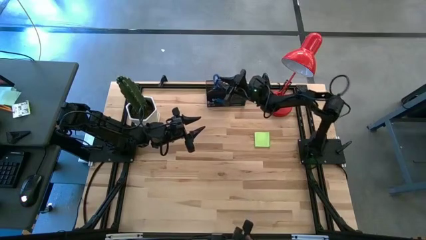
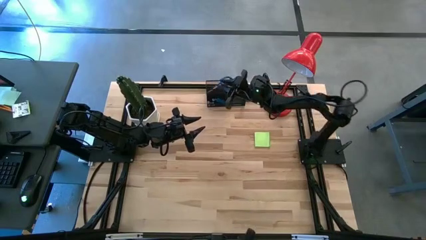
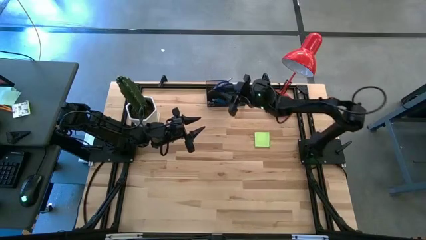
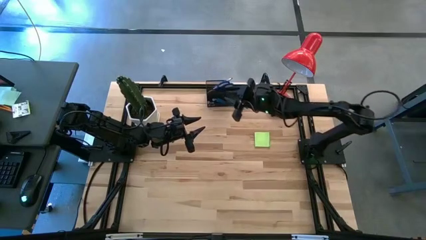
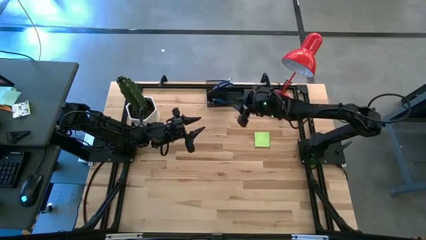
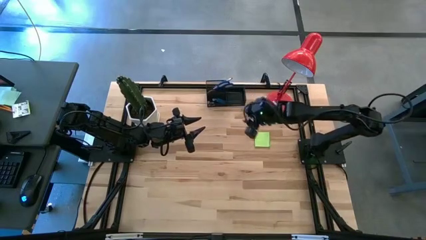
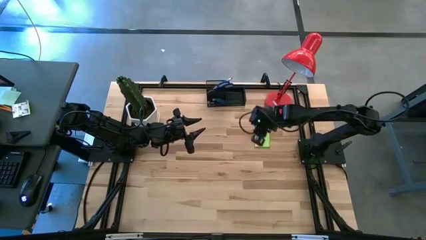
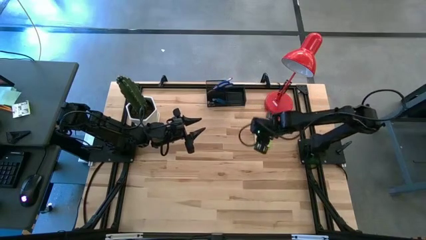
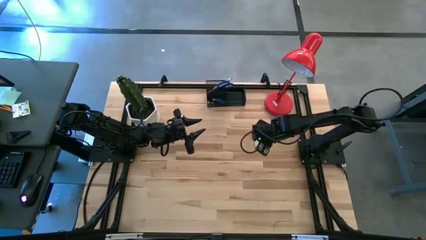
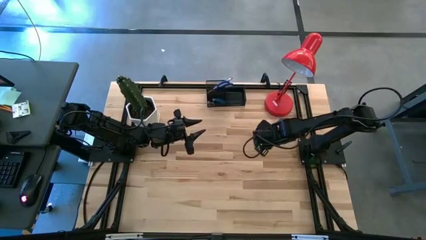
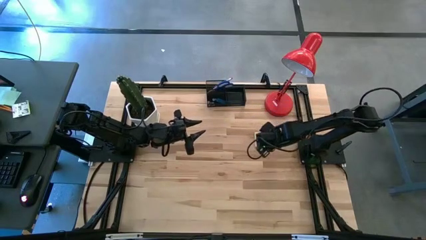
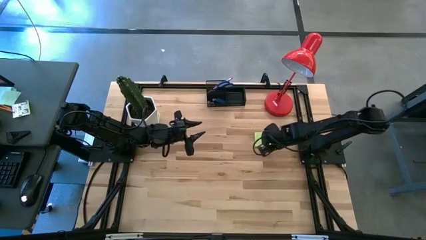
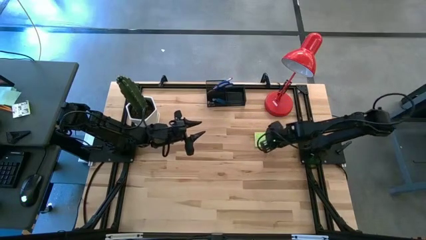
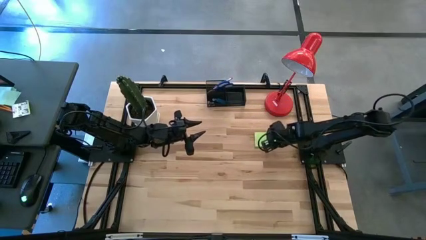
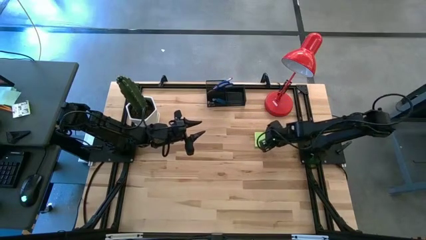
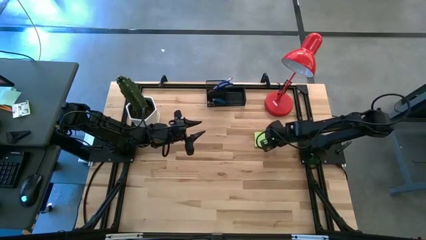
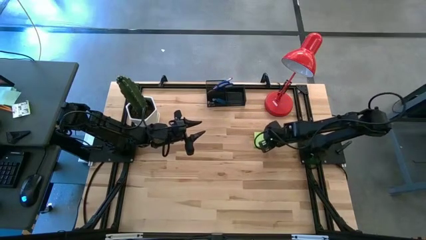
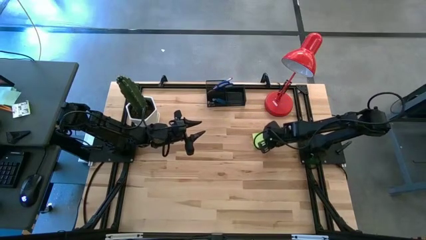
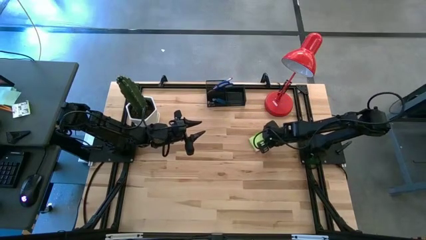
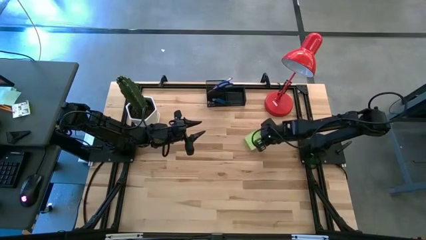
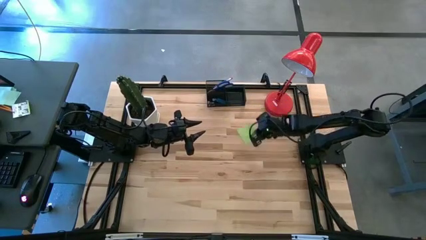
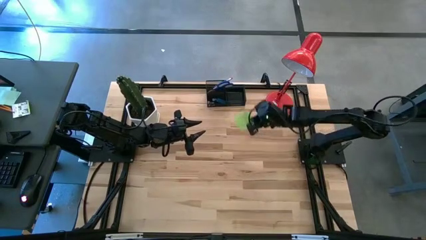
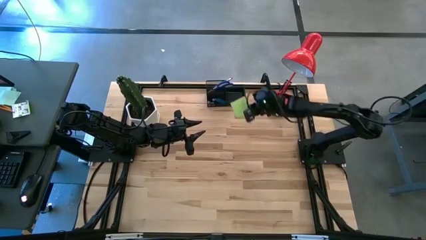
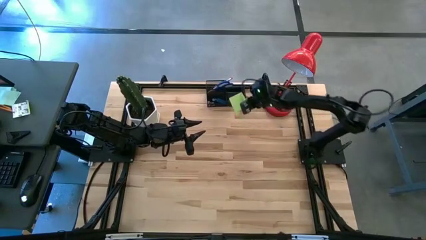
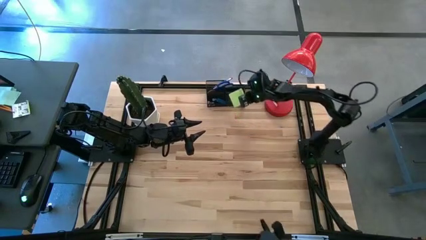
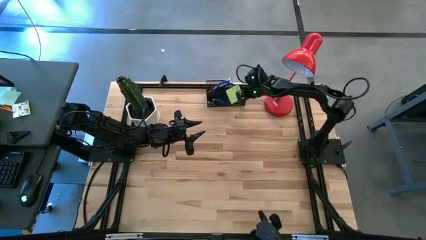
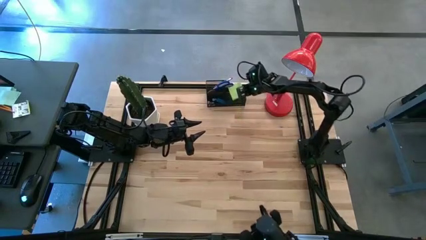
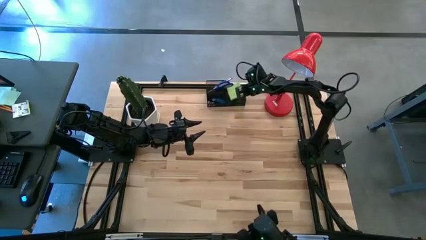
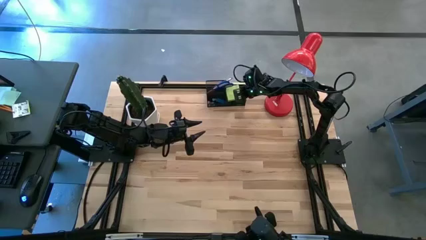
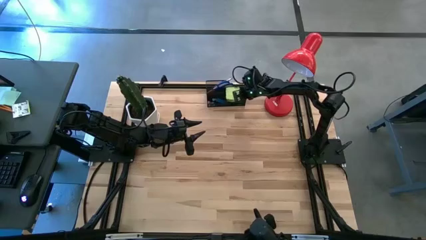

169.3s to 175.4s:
Task: Pick and place office supplies into organizer
Put the green sticky notes into the right section of the desk organizer

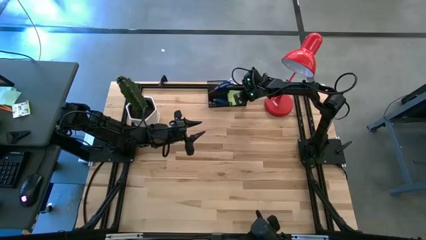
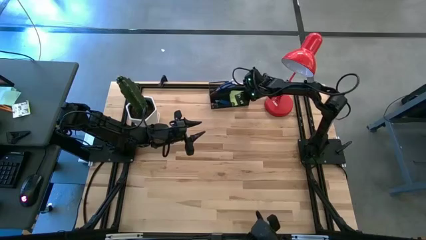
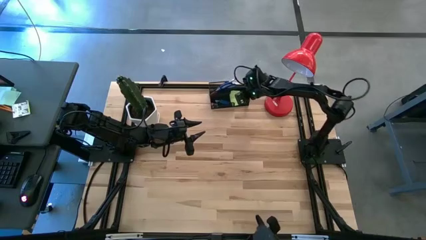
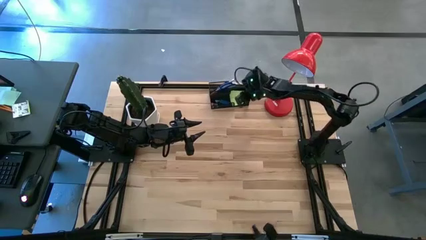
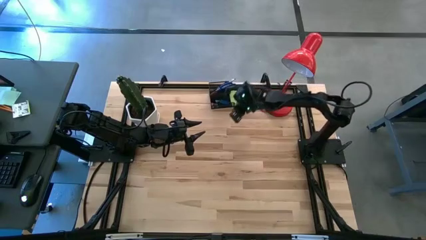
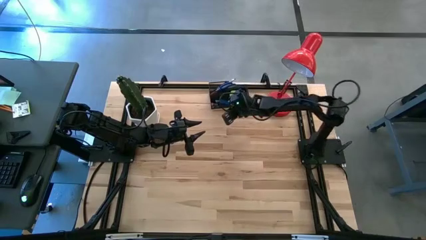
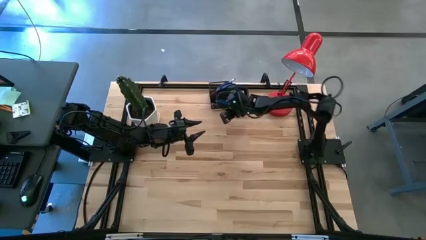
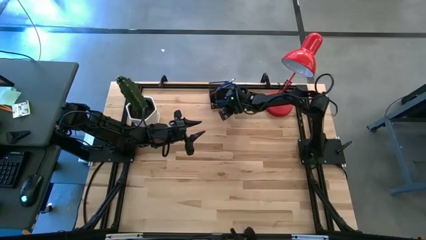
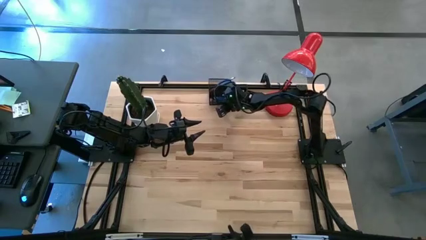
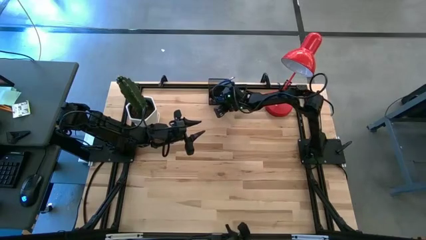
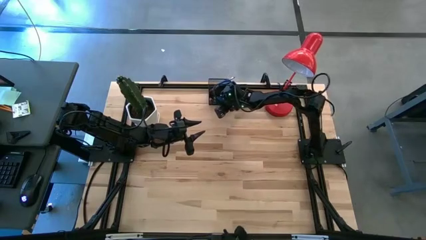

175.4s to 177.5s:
Adjust the desk organizer on the table

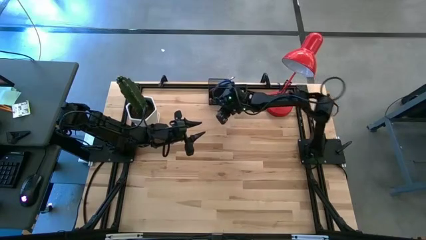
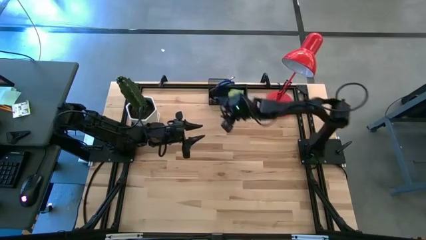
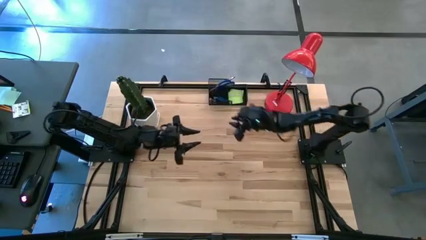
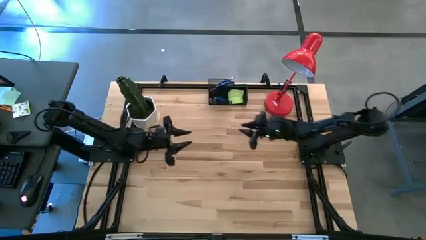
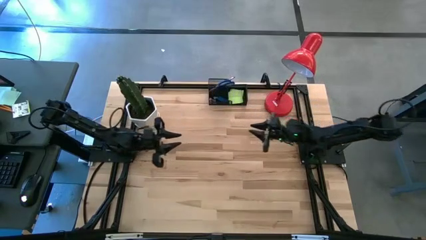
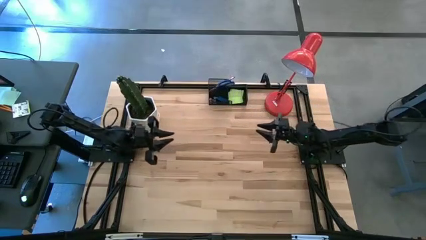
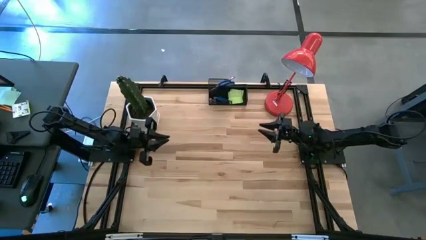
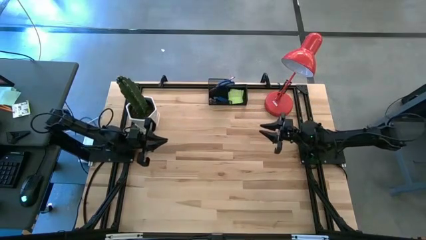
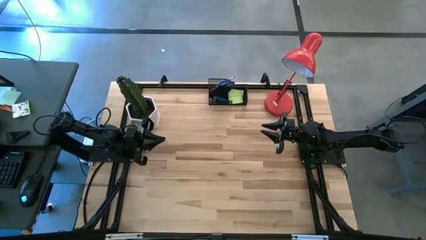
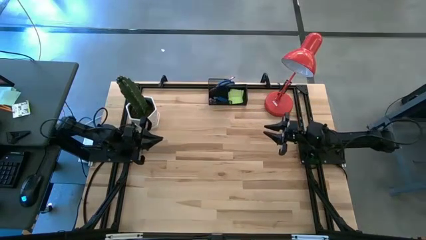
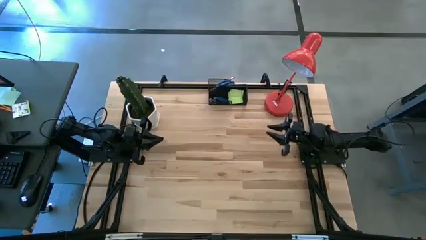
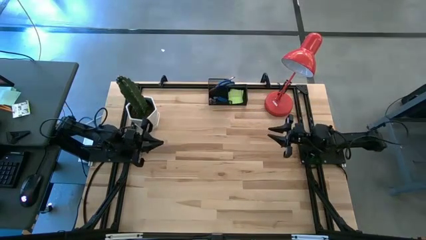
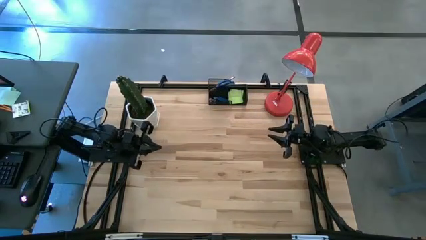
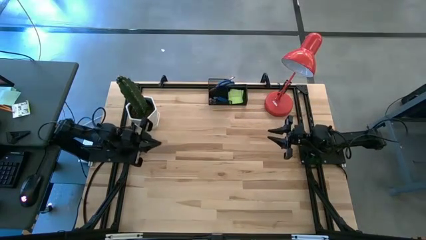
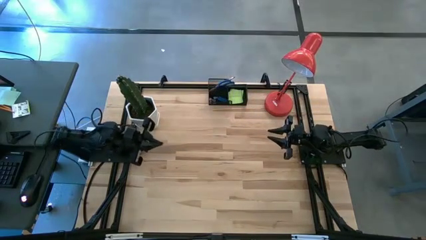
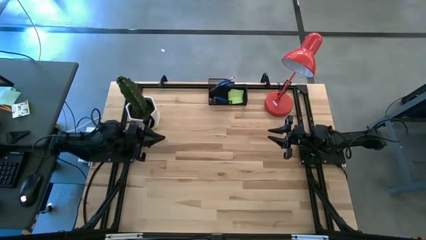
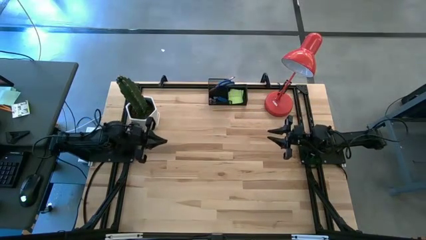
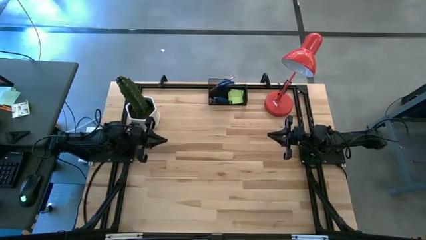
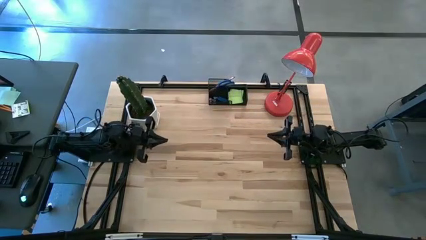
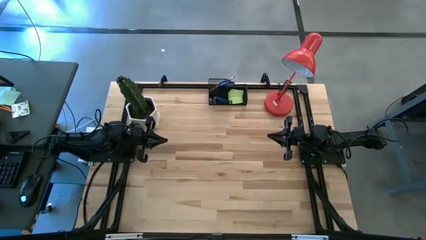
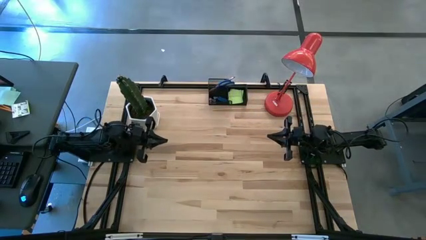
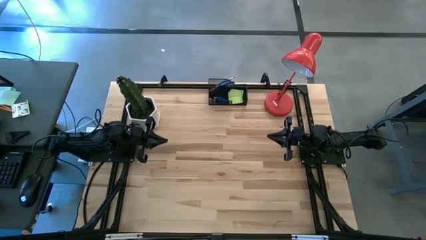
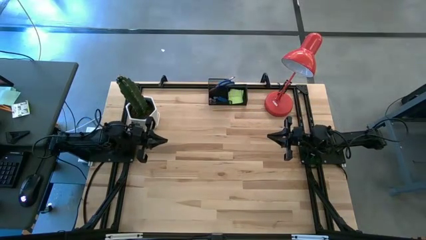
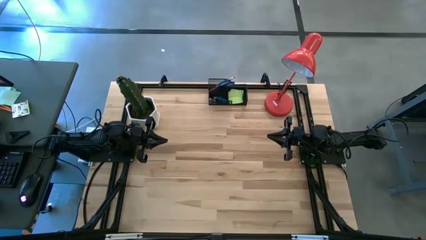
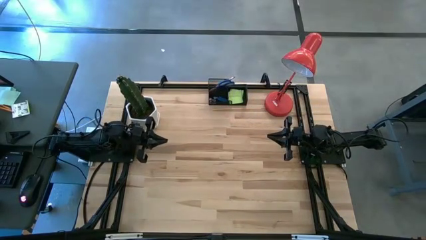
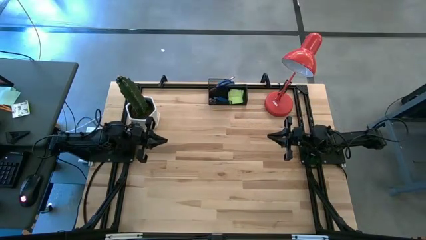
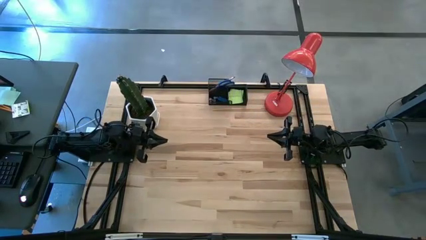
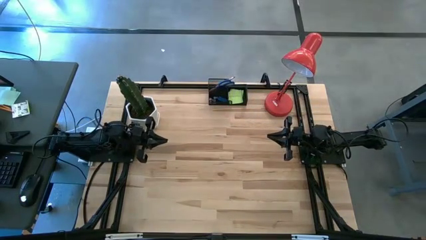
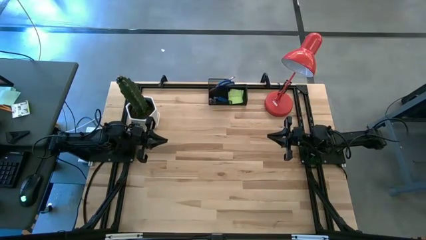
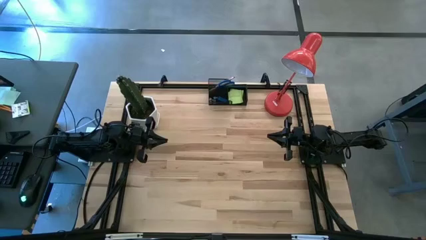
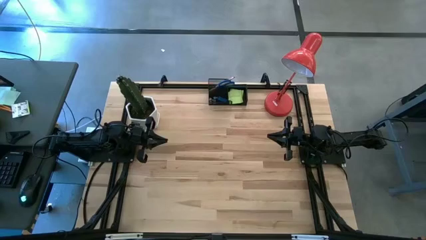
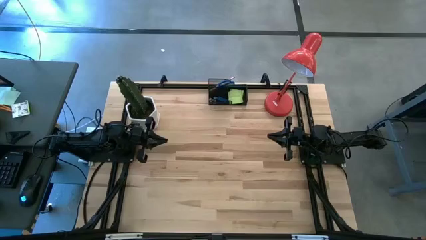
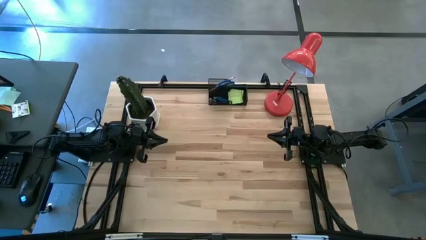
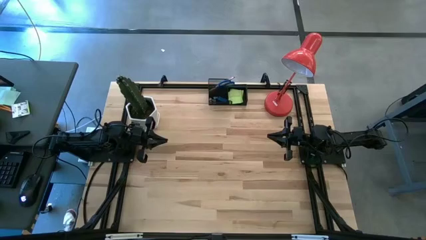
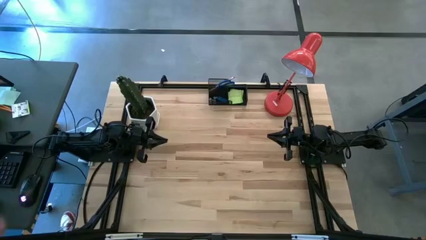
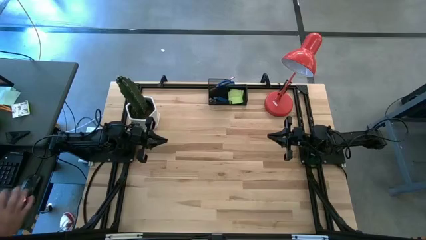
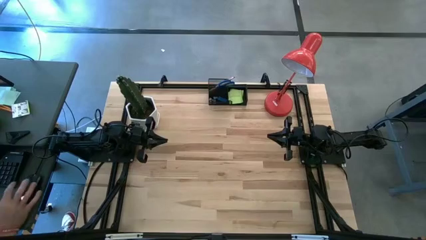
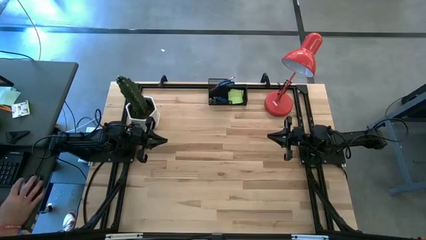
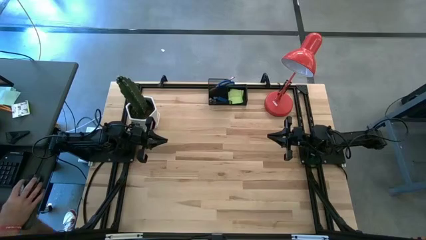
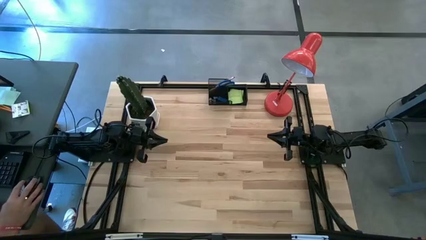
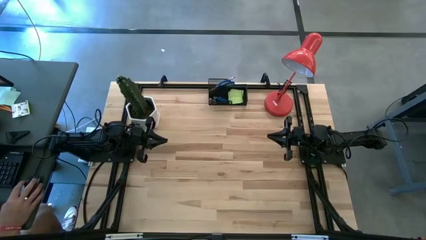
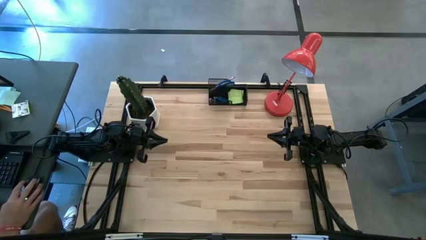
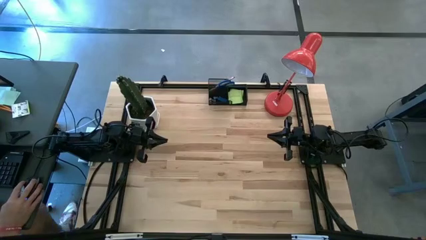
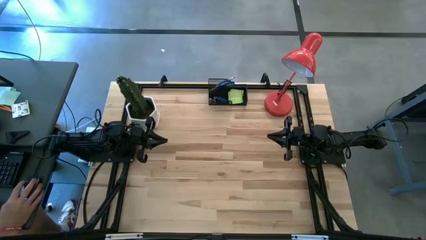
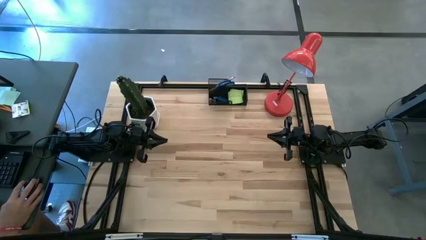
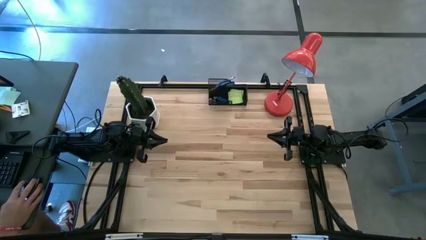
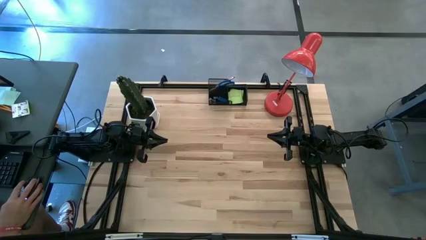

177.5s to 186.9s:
Return to Home Position
